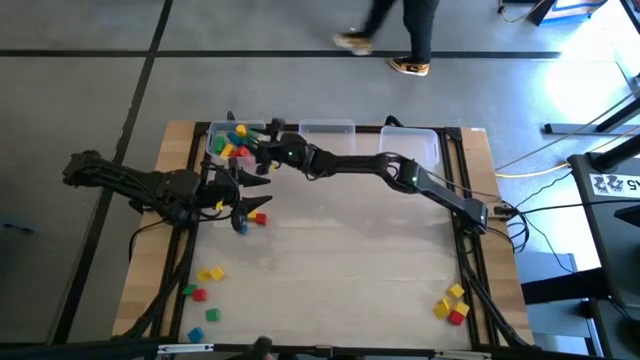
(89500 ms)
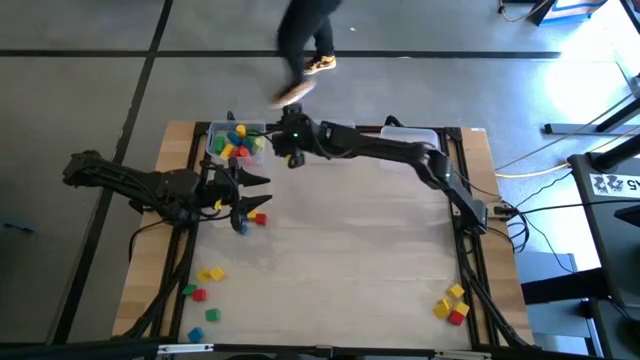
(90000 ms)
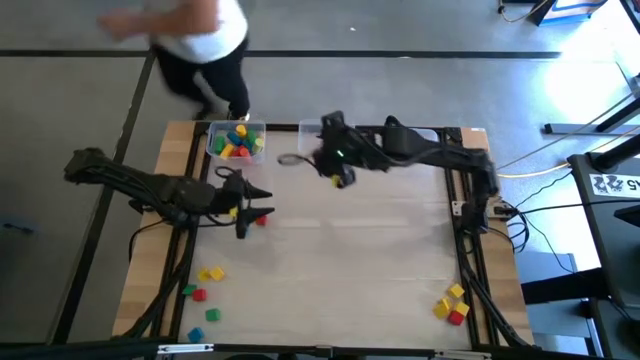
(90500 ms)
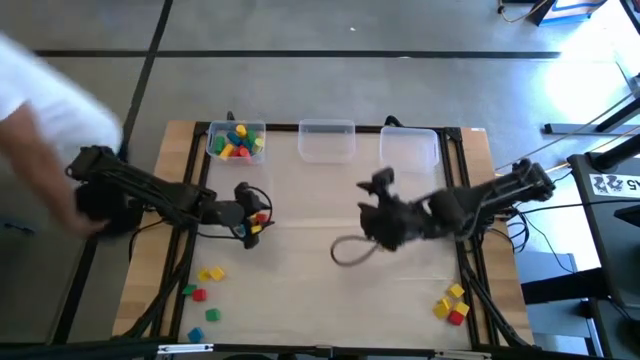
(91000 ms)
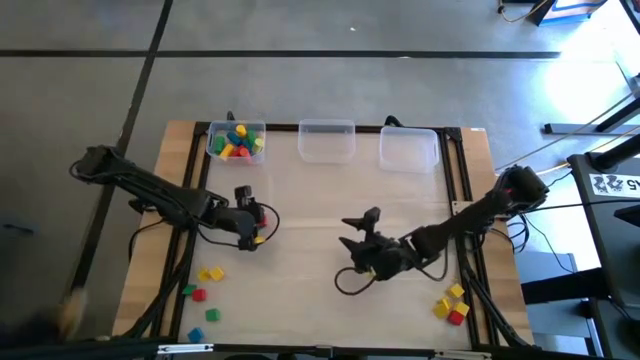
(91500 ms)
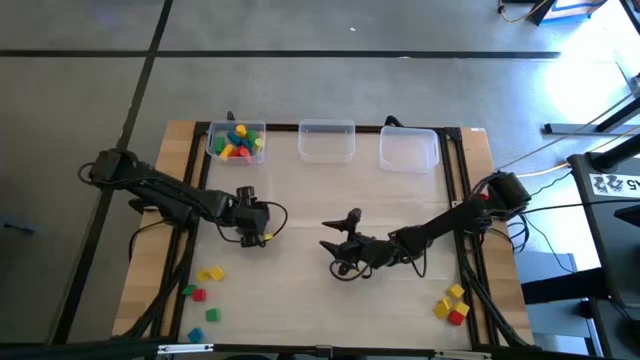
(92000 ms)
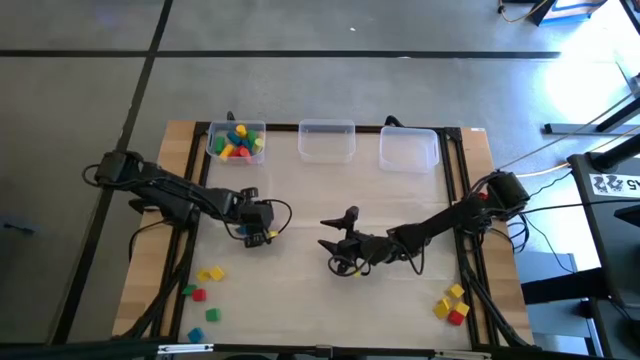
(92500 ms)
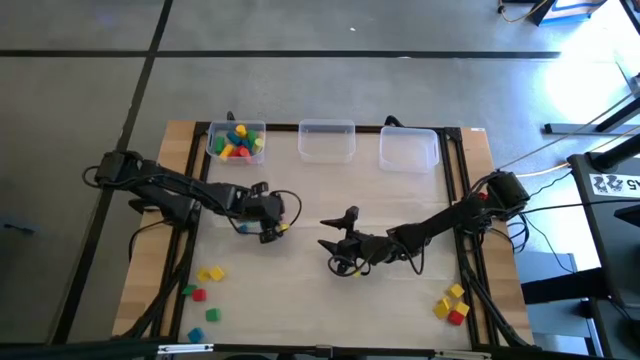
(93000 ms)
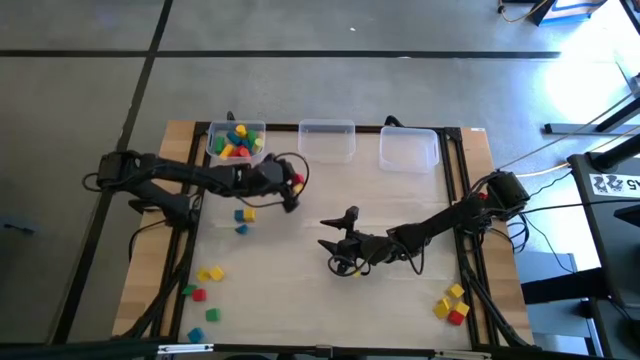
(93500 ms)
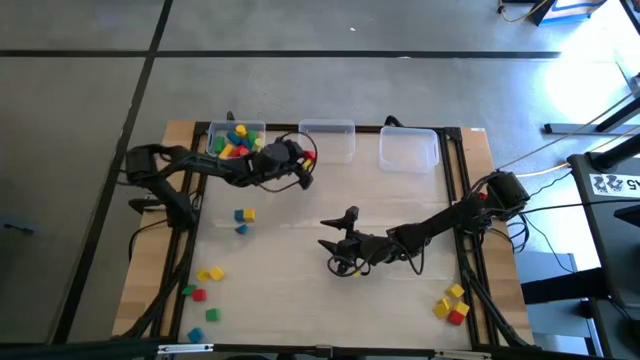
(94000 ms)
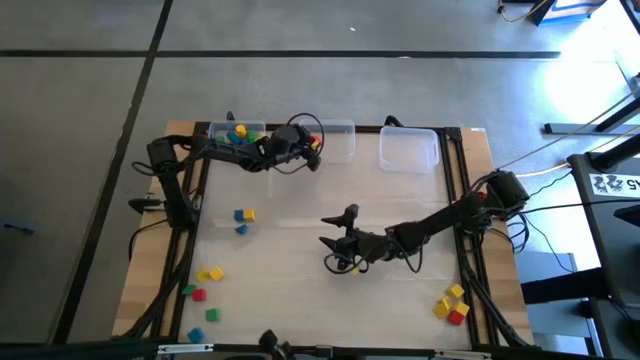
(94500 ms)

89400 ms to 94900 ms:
Task: Sort blocks by size
Put the square red block into the middle transparent bin

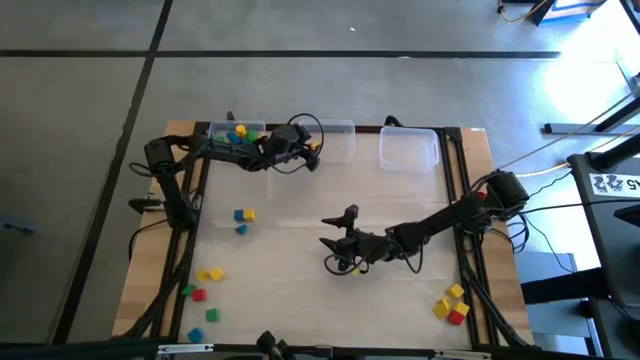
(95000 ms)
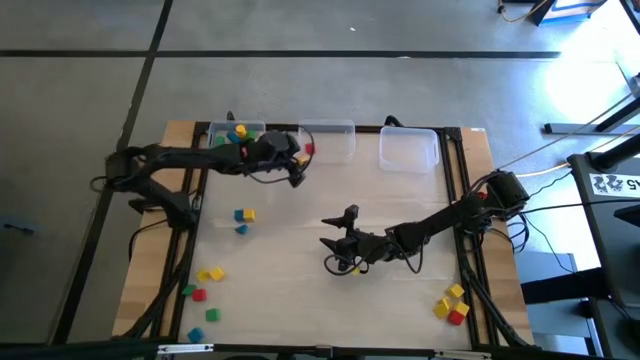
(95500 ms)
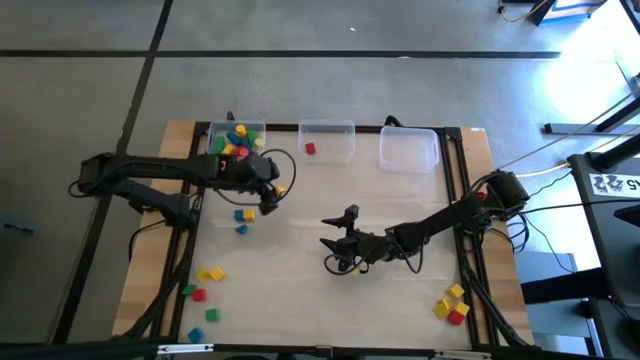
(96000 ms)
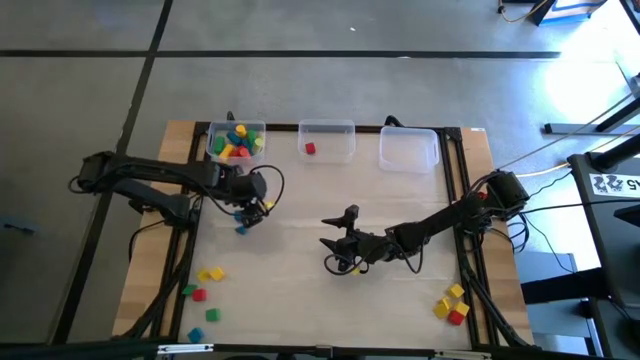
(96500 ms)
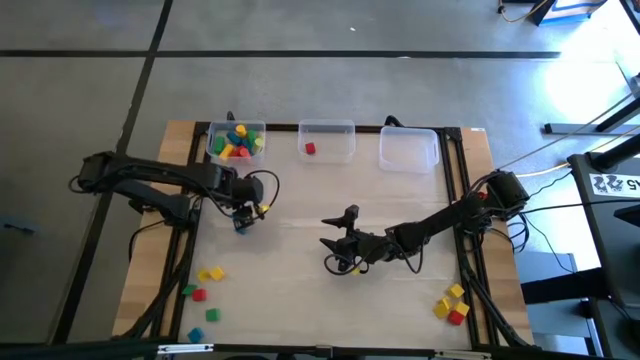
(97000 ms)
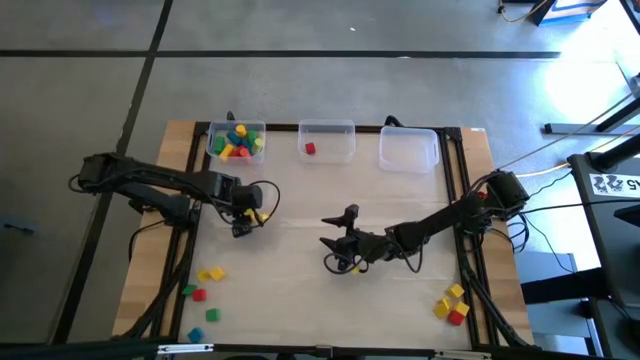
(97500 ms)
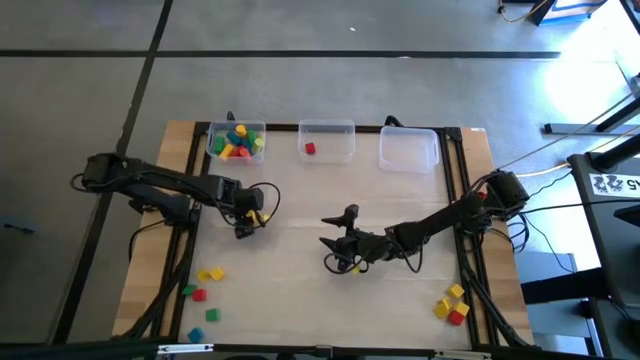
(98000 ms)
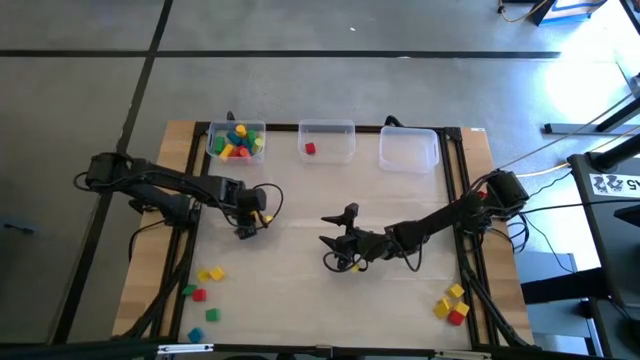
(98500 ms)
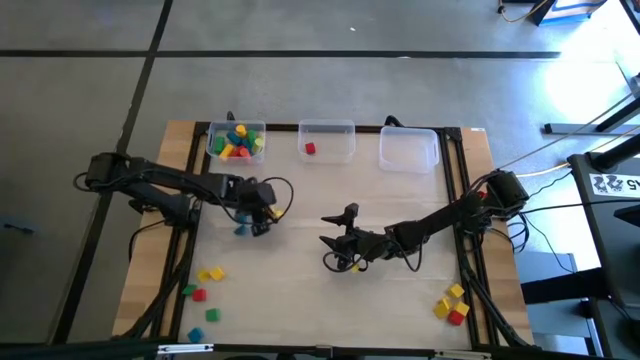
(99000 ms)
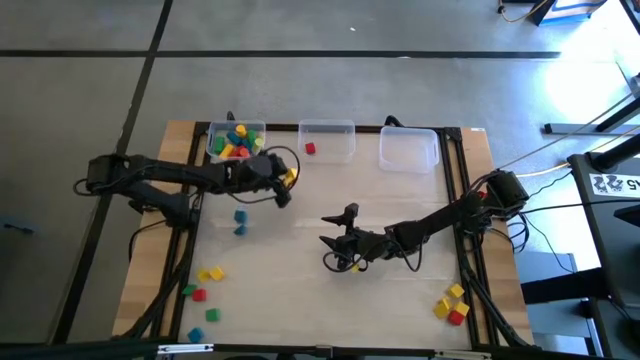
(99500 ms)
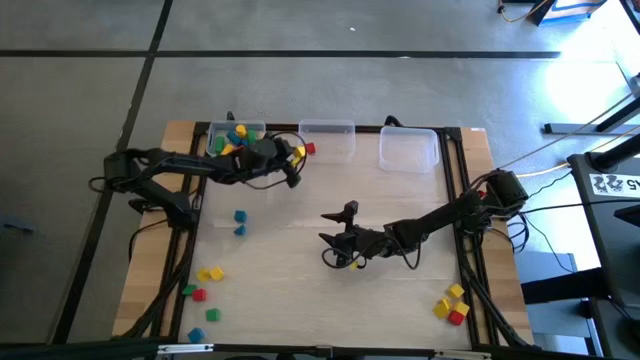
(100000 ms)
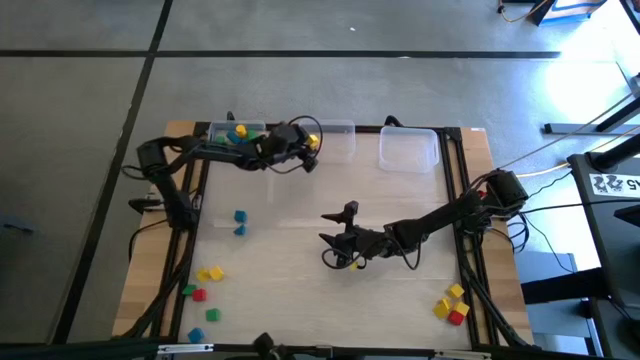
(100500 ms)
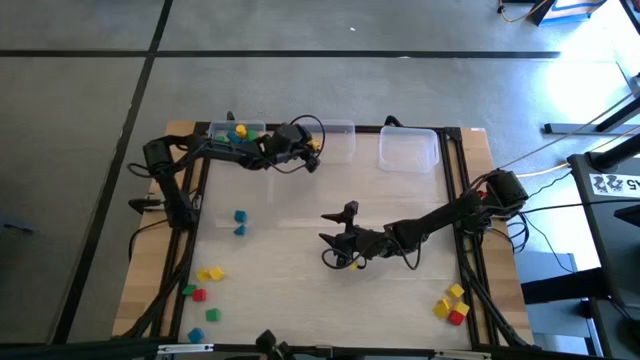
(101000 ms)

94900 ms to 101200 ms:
Put the square yellow block into the middle transparent bin

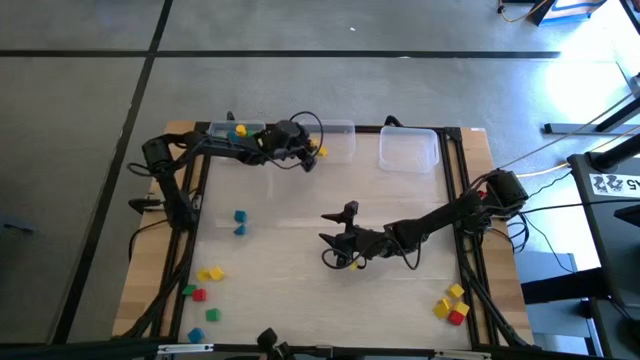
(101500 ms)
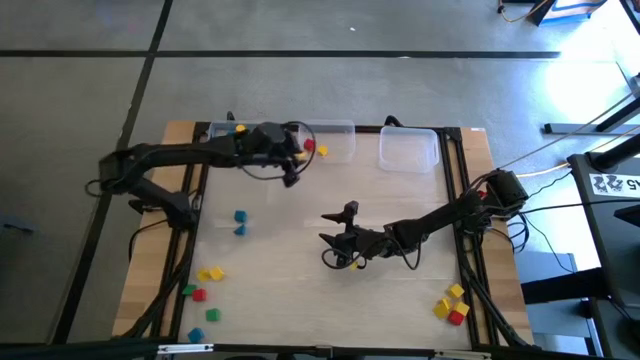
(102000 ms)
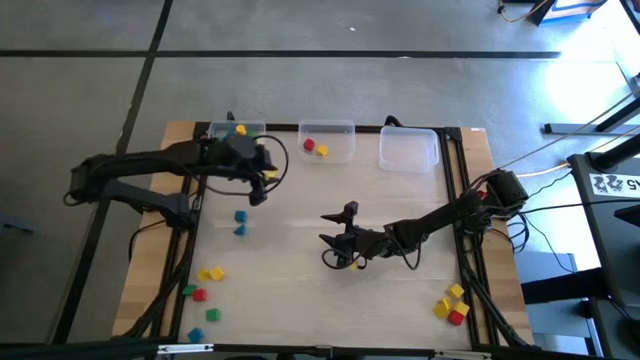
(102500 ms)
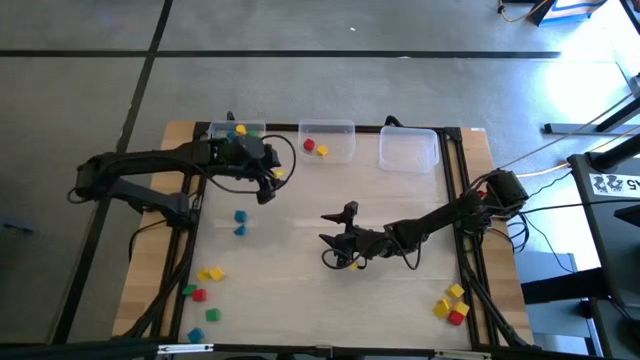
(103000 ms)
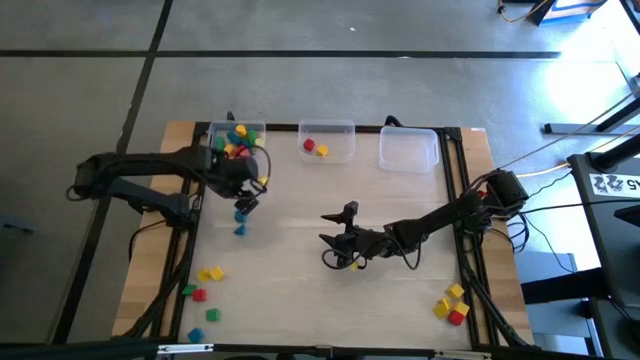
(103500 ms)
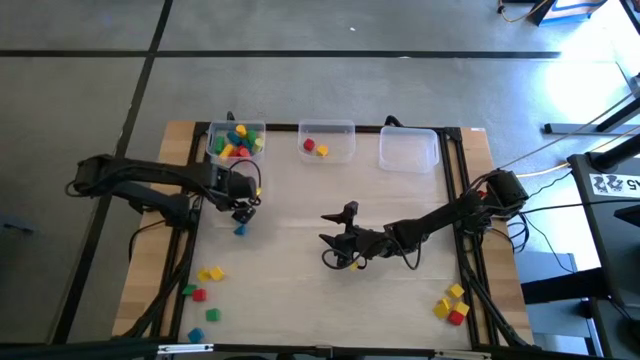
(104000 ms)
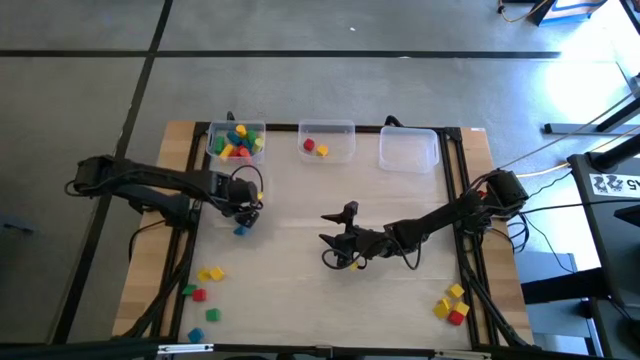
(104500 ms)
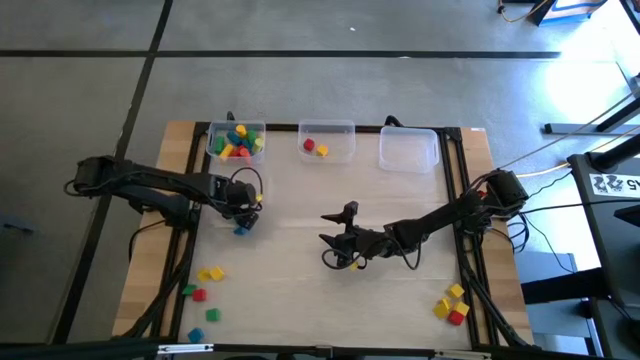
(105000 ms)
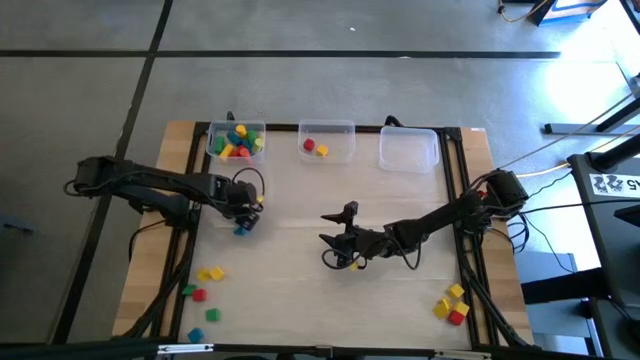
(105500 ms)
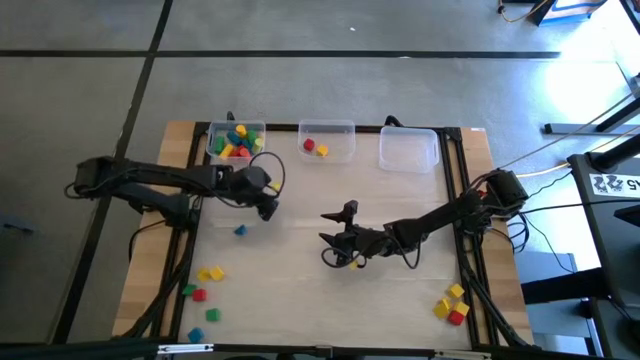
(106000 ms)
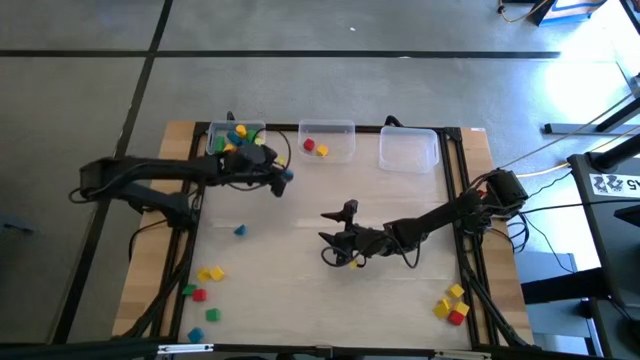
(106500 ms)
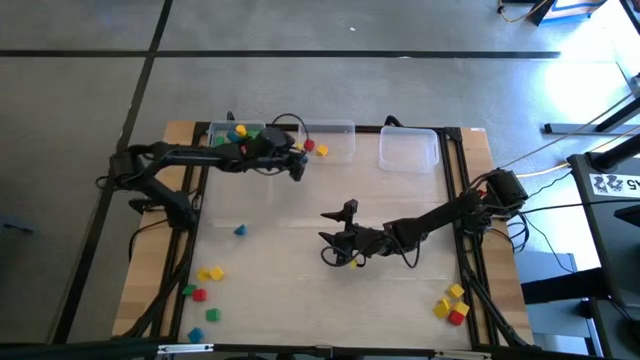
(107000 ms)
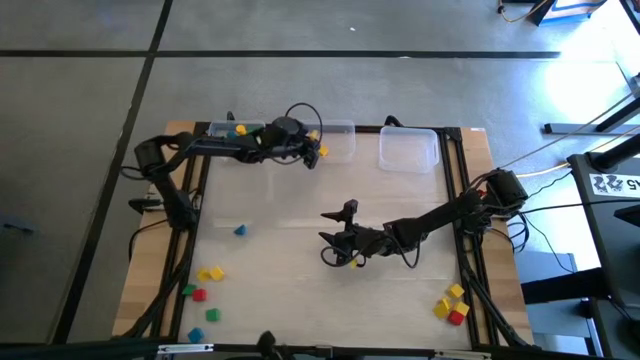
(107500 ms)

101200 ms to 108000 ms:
Put the square blue block into the middle transparent bin

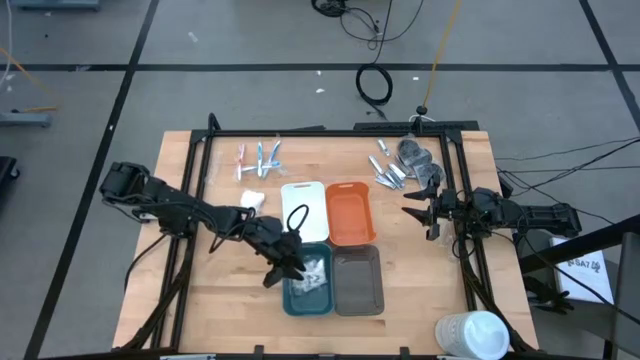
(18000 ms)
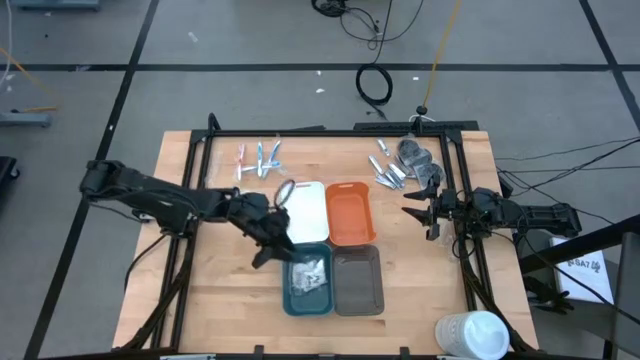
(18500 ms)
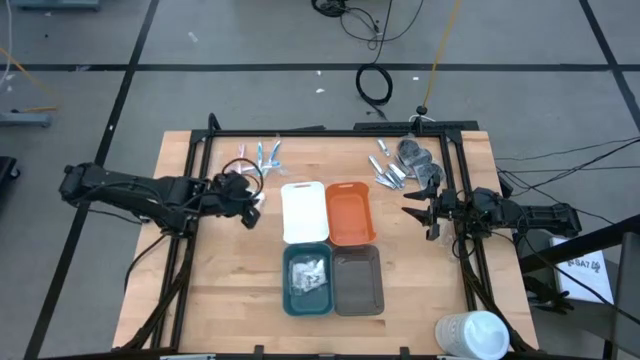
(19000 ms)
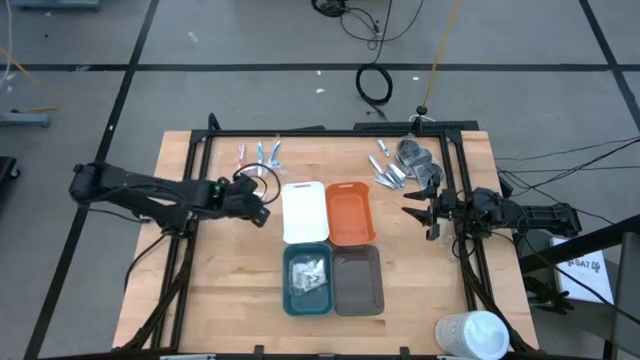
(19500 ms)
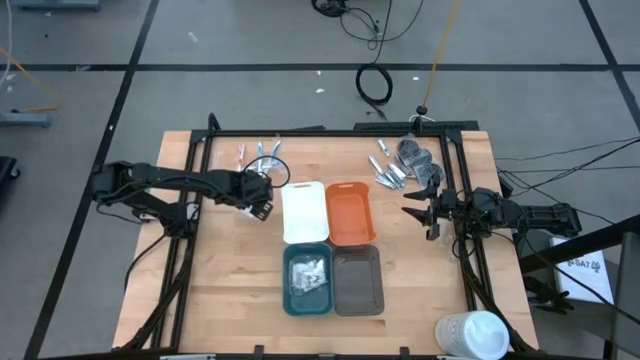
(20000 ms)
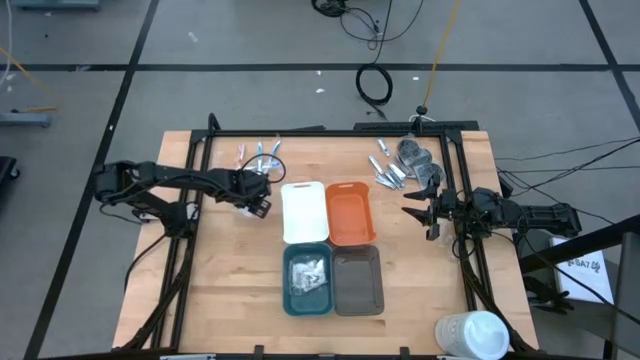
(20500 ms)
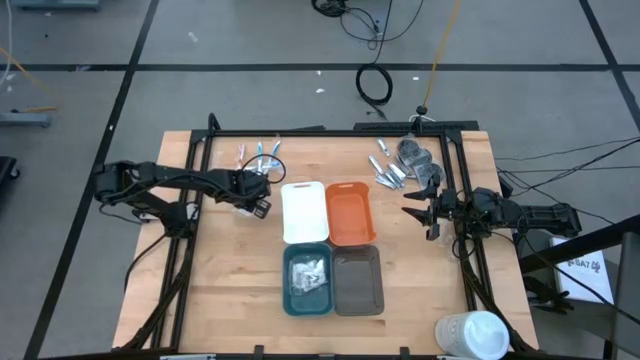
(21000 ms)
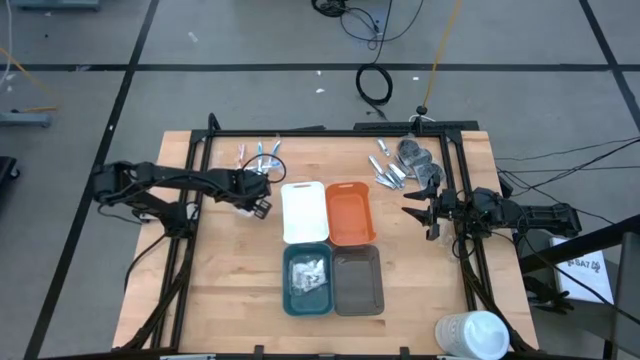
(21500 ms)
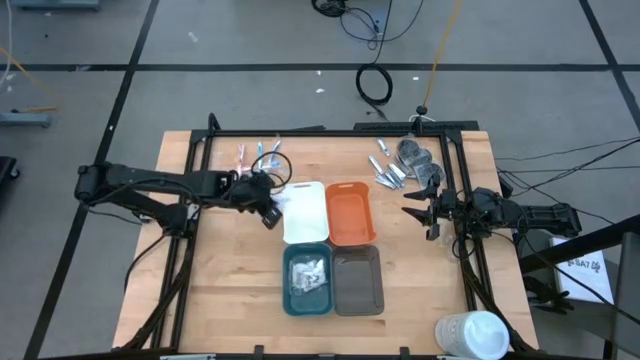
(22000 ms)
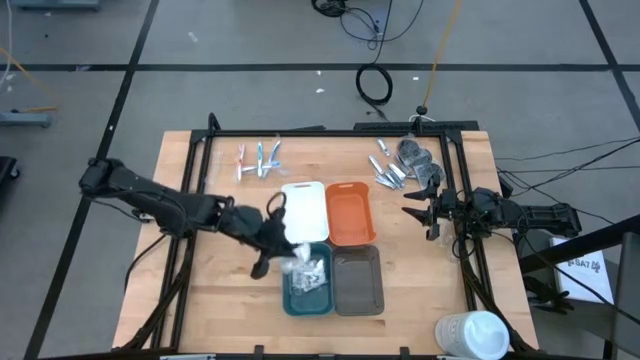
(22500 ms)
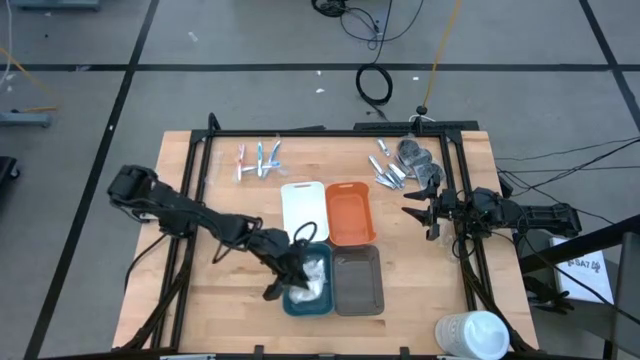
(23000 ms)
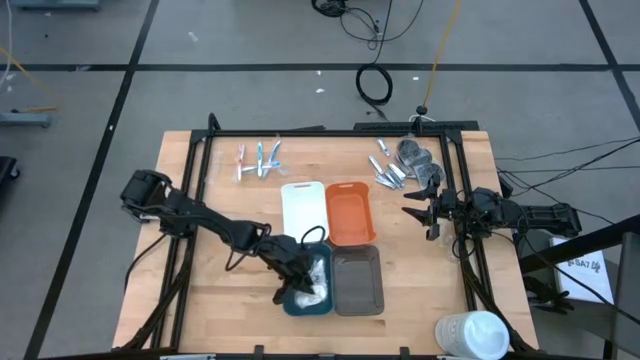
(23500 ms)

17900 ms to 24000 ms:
Task: Pick & Place Travel size toiletries
Put the vanity pack into the blue bin
